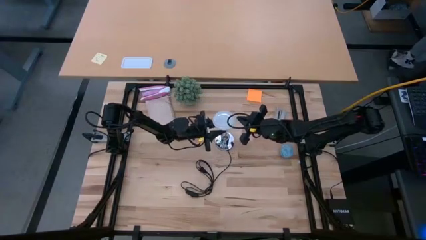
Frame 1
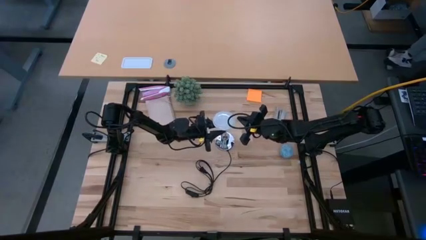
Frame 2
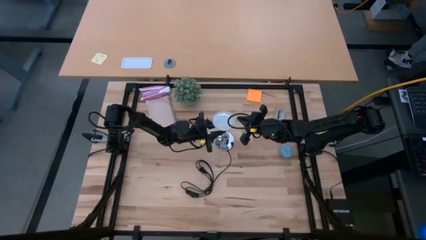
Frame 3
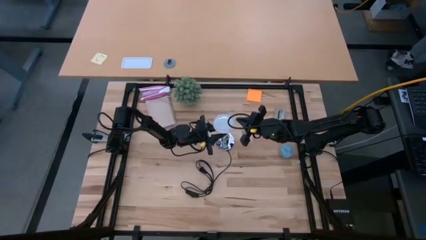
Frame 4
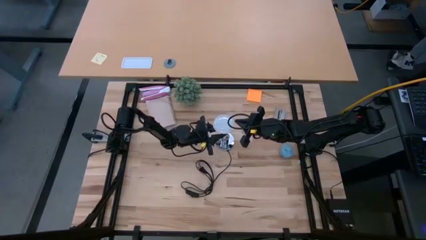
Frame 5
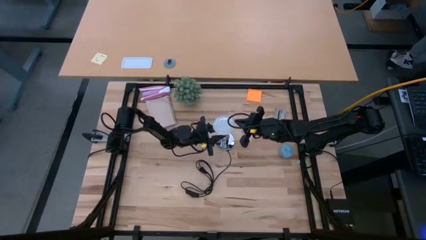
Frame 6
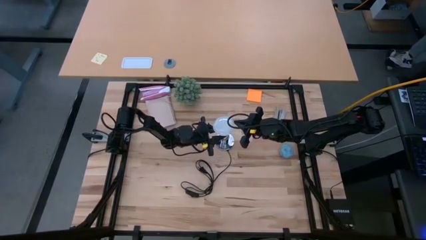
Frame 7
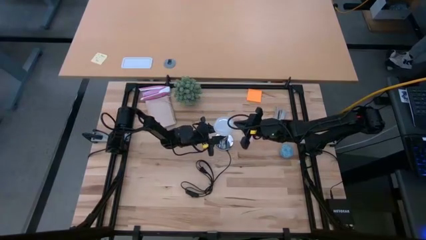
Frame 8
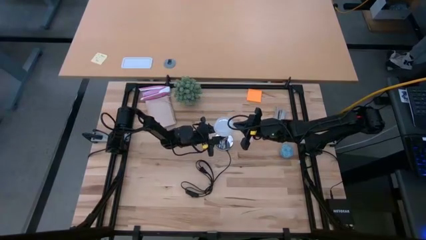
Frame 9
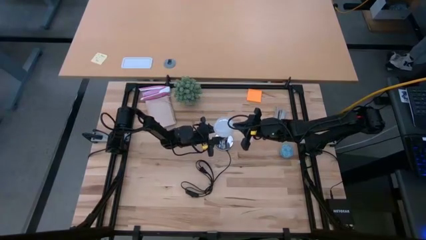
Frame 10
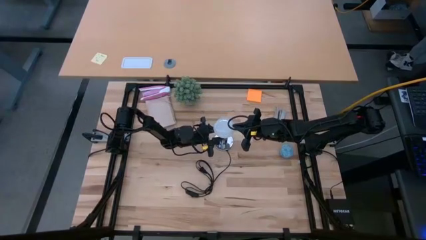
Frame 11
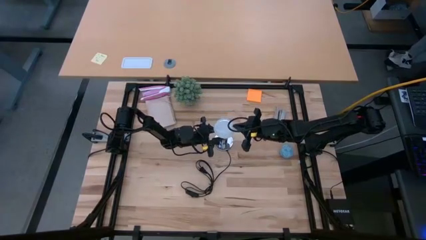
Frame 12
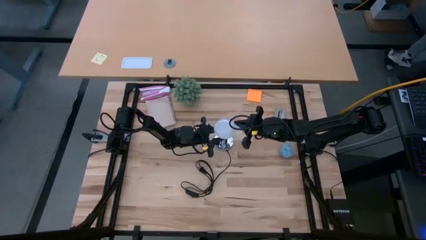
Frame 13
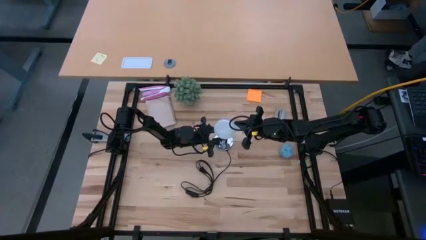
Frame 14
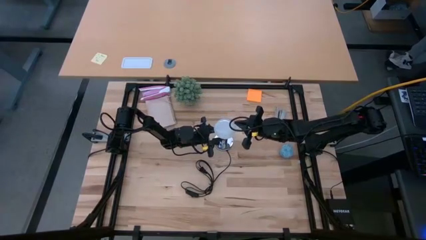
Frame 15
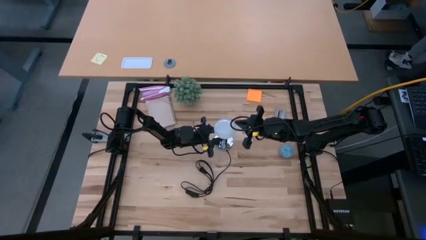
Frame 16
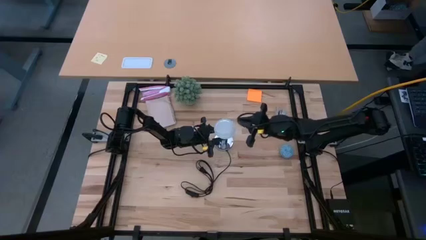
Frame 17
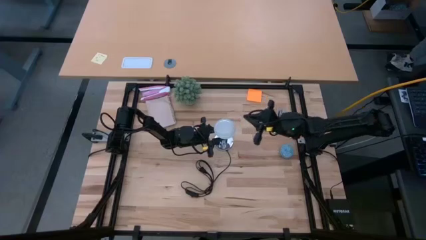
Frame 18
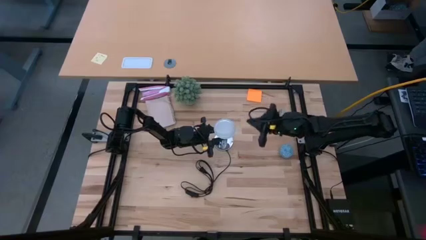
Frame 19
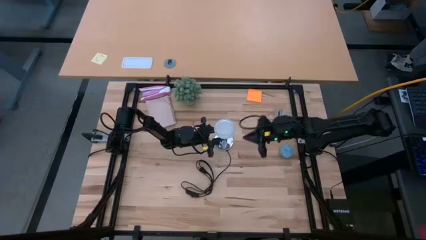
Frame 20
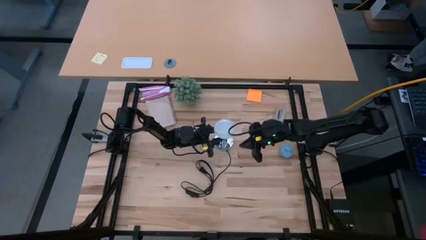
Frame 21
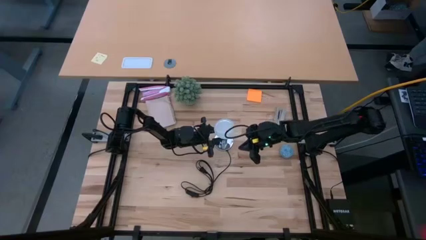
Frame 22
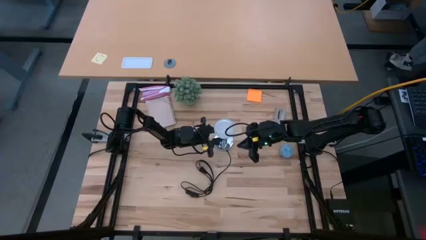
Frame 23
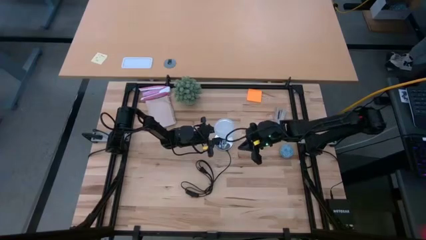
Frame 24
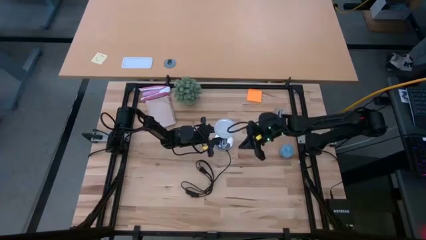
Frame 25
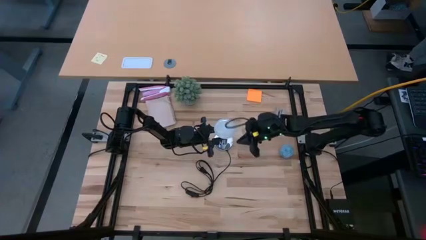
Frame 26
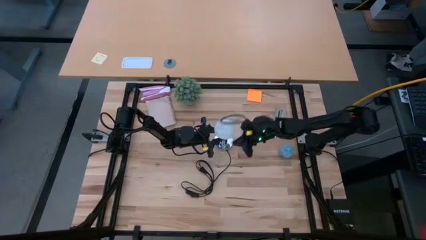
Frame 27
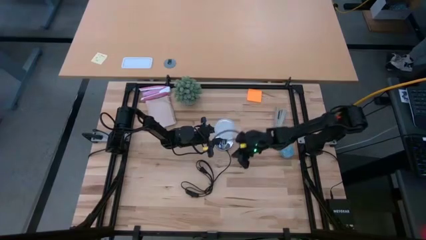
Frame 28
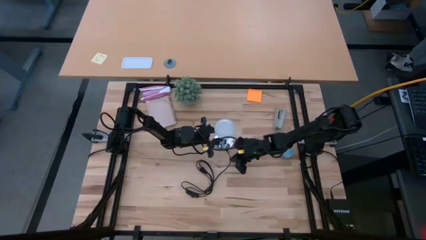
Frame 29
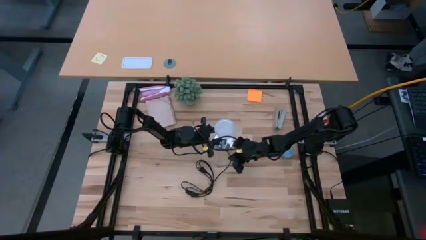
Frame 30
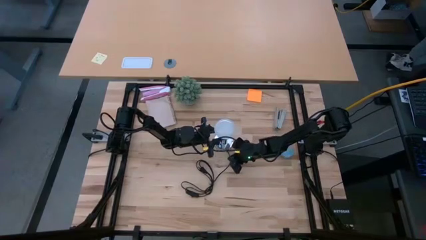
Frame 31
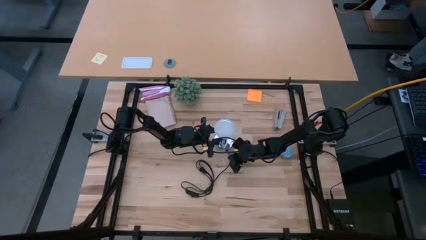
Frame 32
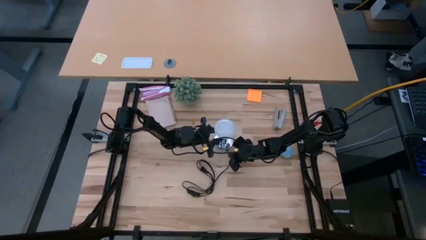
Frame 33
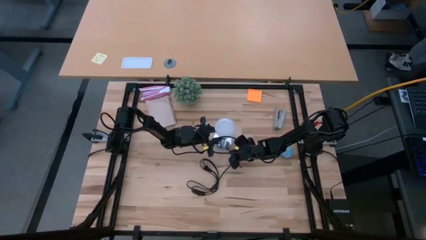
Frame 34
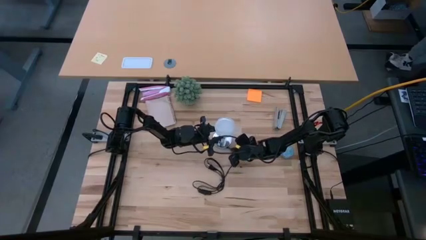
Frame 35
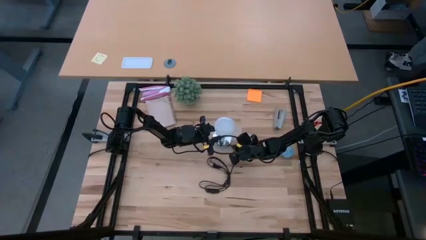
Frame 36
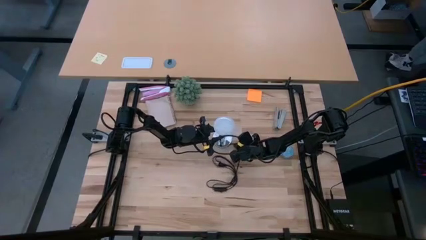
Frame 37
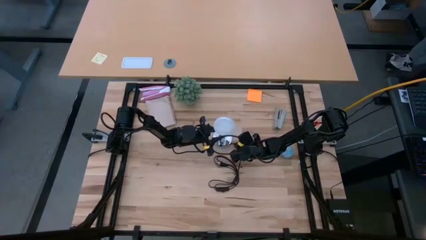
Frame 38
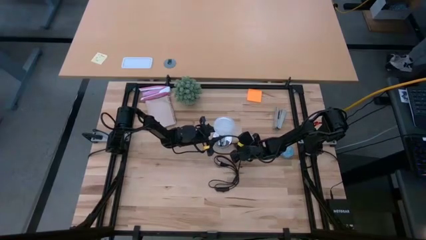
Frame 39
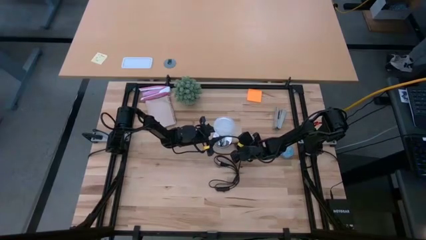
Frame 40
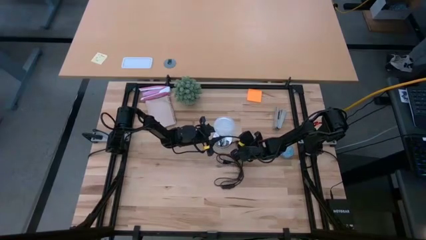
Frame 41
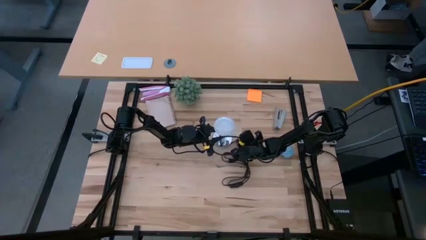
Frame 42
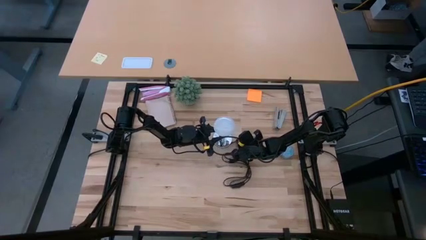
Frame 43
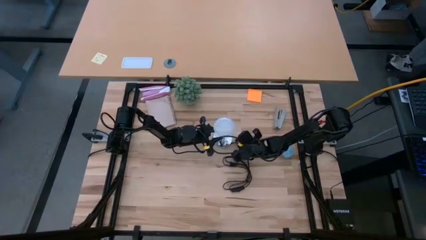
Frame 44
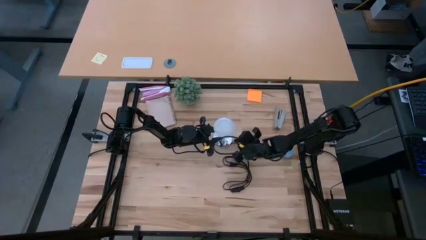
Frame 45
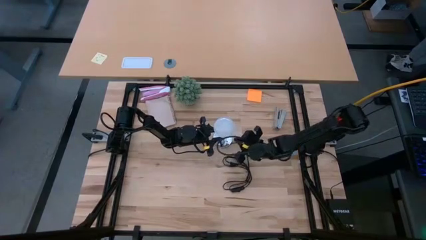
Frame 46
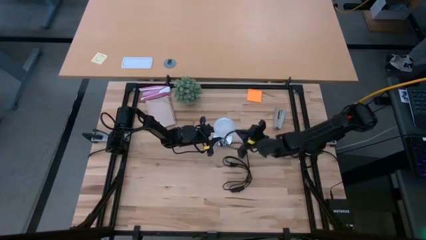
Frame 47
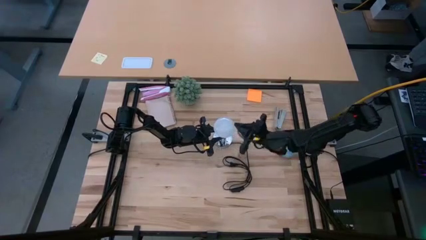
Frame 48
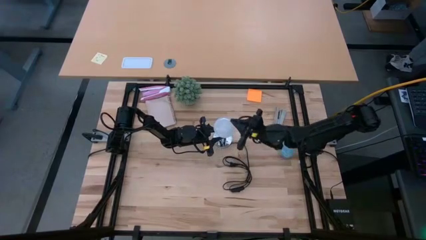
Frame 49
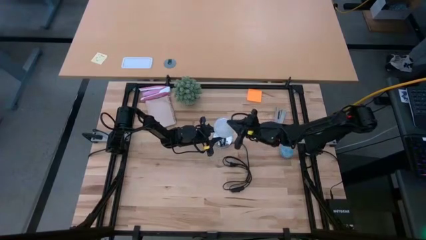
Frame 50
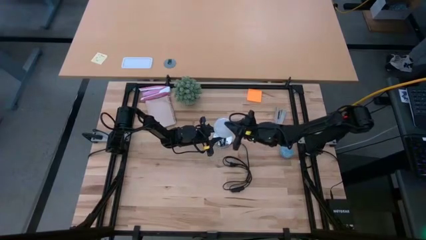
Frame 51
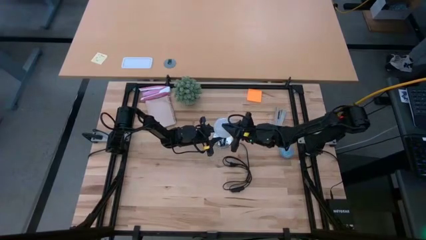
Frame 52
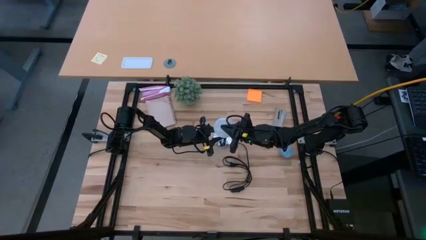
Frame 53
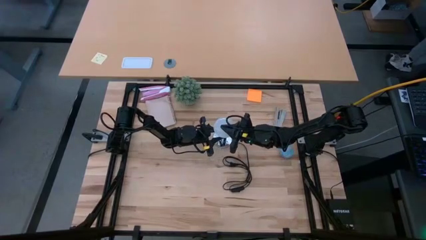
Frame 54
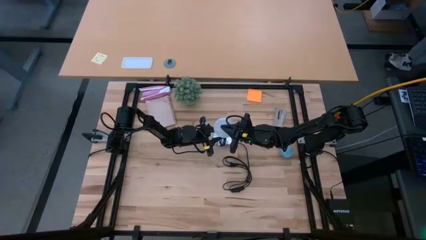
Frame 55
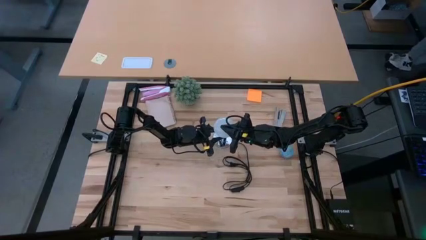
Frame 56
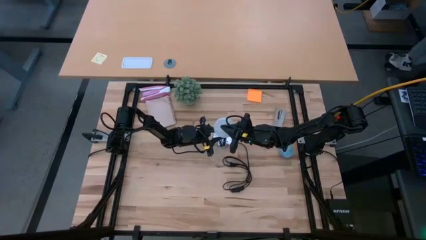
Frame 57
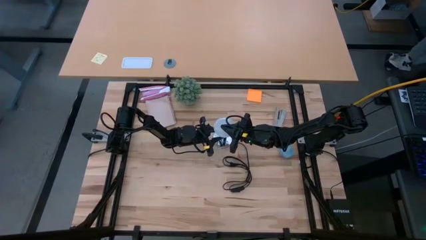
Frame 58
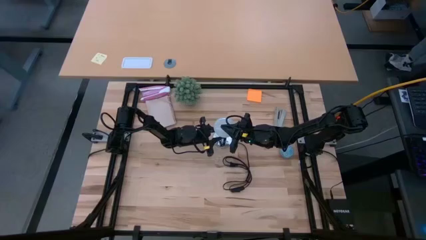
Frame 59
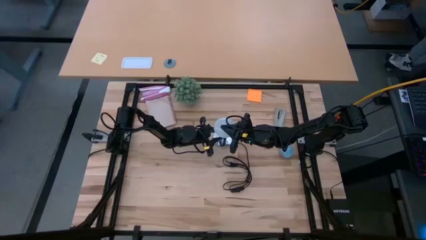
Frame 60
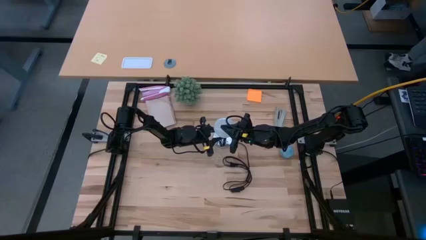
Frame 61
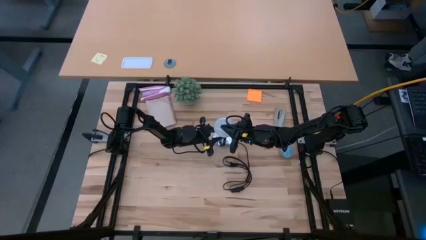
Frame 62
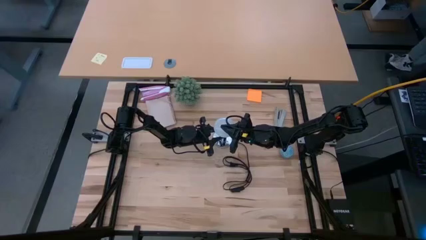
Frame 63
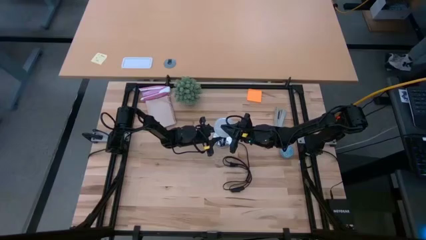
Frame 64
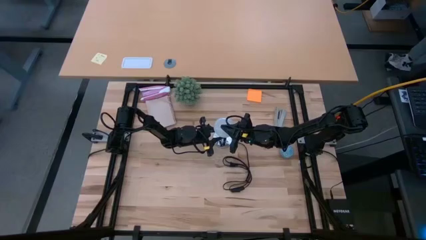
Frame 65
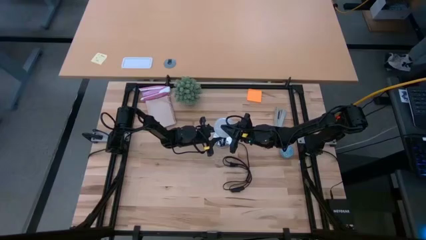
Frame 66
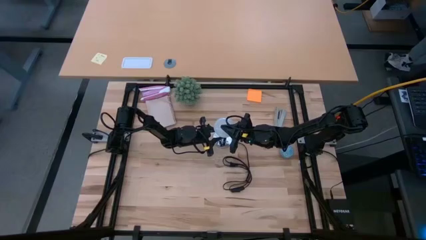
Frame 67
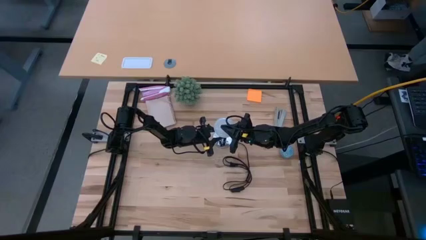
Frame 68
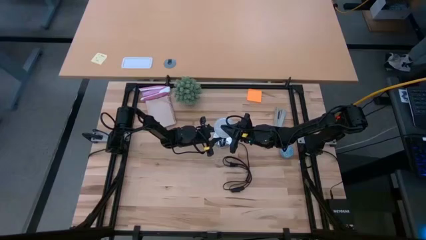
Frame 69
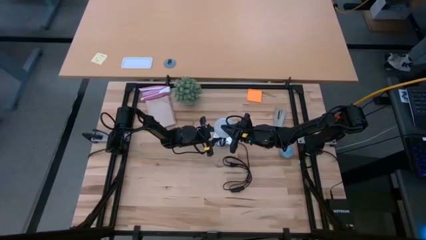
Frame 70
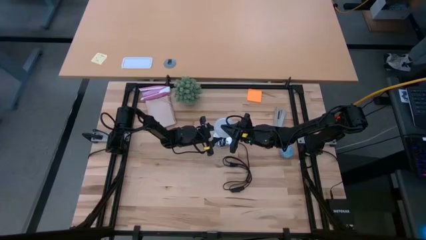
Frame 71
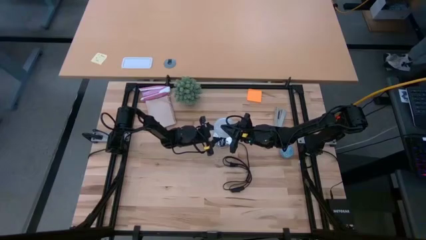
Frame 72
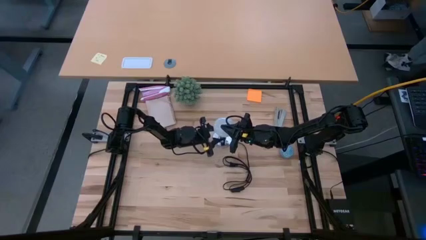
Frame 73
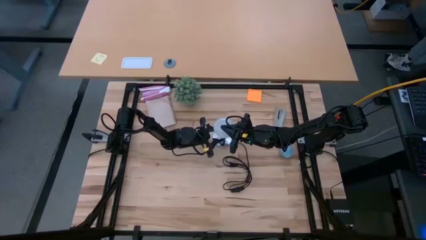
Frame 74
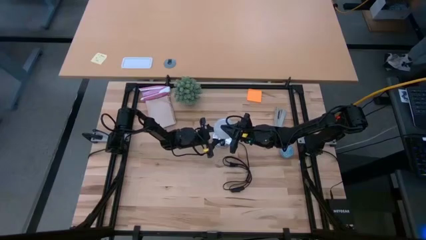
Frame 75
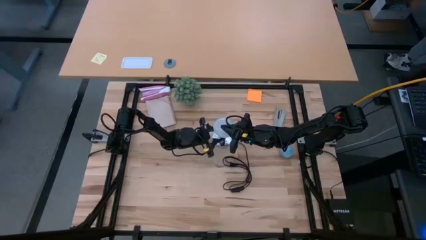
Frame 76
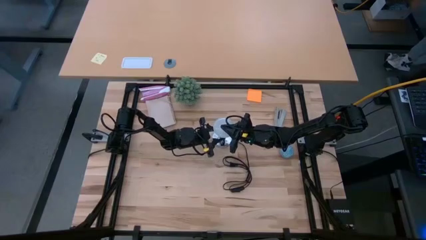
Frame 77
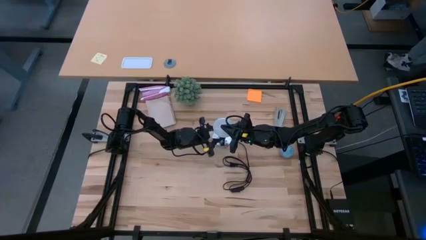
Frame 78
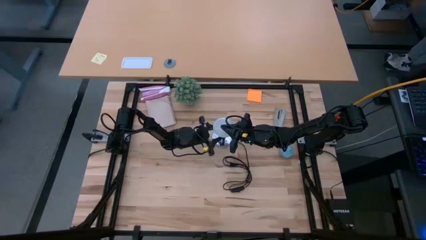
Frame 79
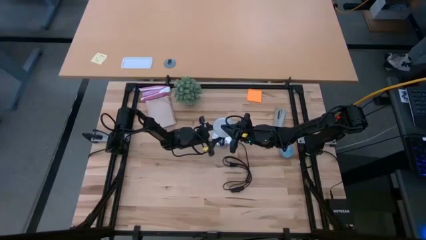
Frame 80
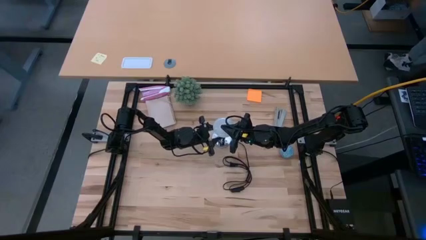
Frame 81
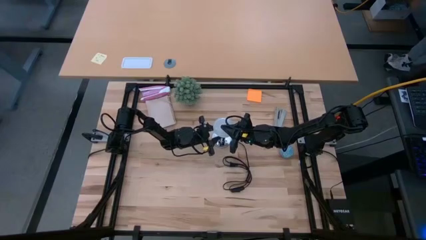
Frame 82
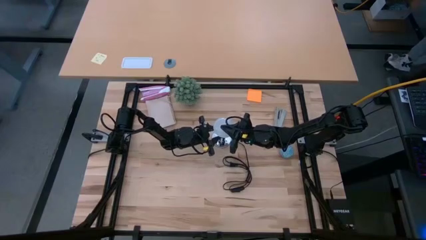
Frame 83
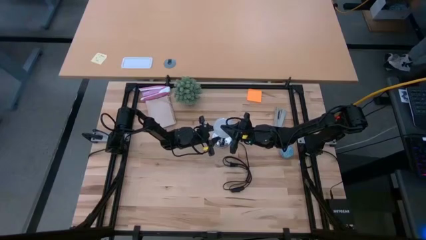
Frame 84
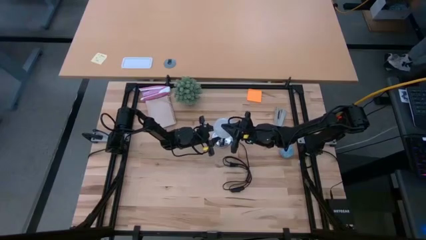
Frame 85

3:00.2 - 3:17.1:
Task: Screw lightbulb
Insert the lightbulb into the lamp
